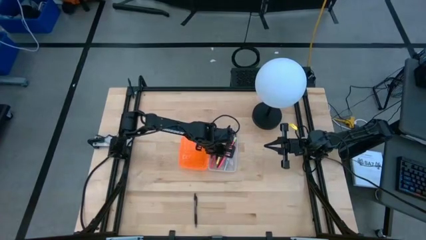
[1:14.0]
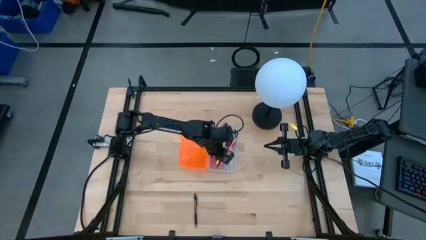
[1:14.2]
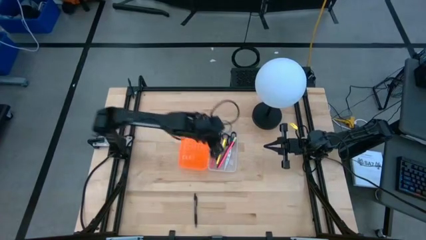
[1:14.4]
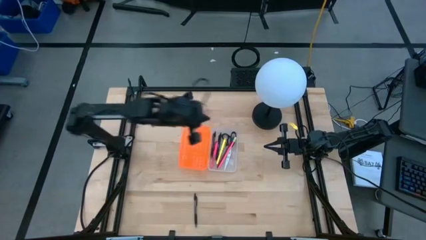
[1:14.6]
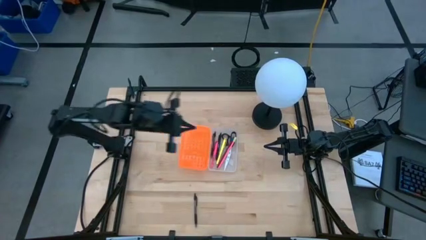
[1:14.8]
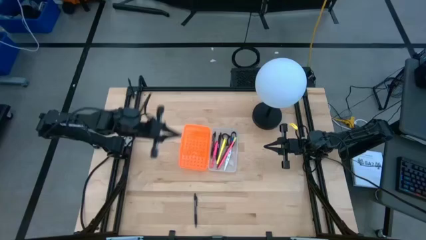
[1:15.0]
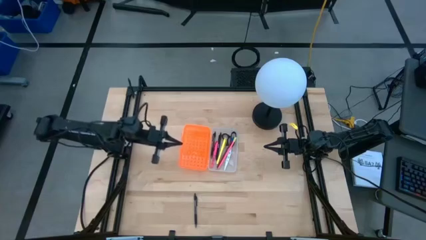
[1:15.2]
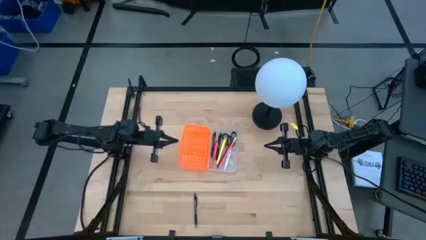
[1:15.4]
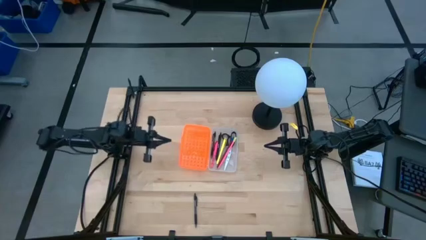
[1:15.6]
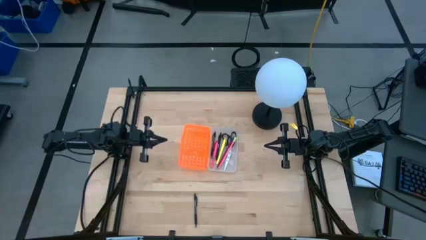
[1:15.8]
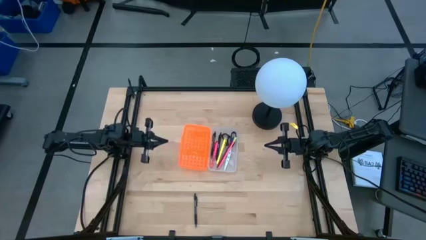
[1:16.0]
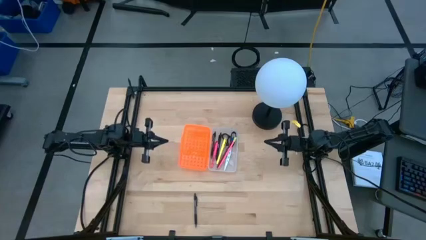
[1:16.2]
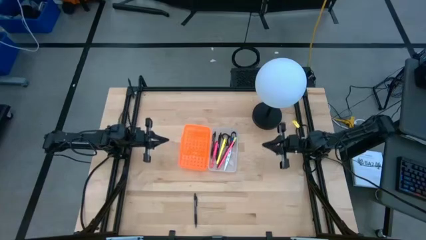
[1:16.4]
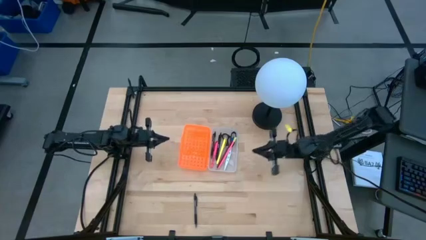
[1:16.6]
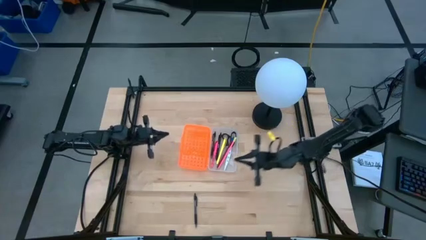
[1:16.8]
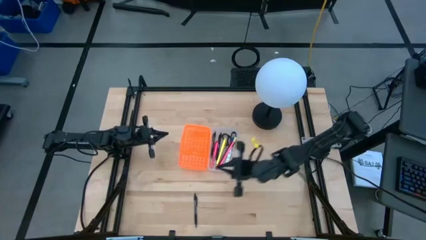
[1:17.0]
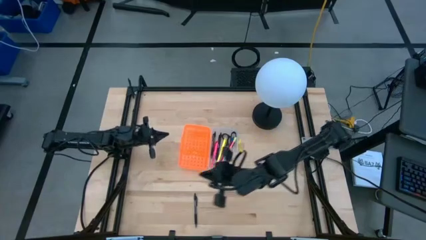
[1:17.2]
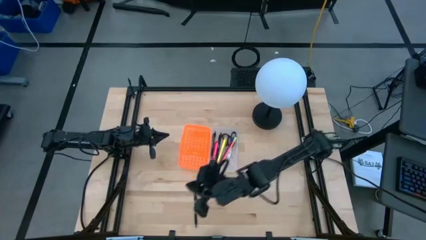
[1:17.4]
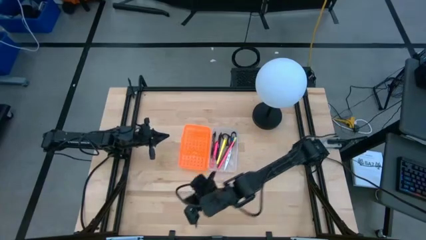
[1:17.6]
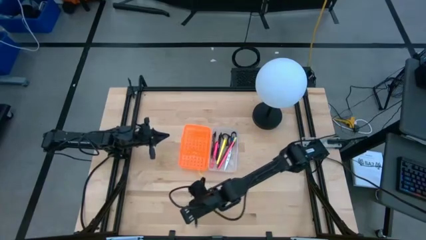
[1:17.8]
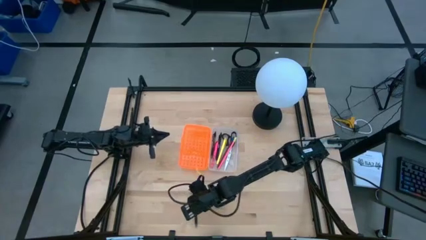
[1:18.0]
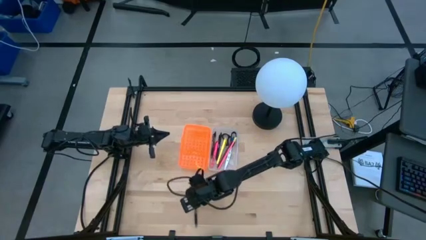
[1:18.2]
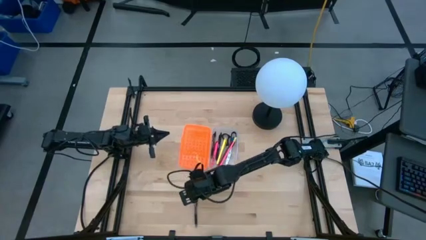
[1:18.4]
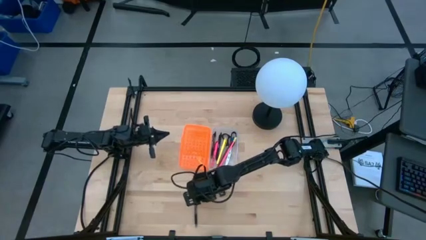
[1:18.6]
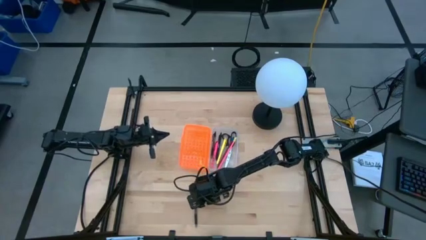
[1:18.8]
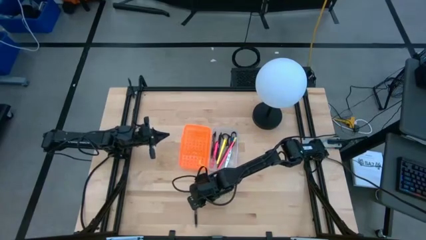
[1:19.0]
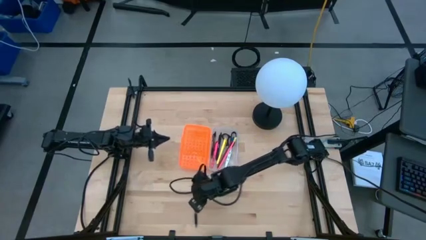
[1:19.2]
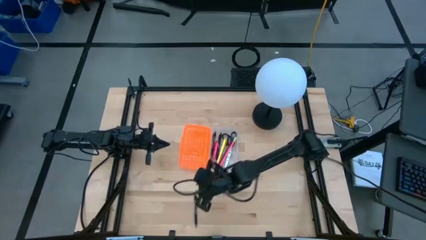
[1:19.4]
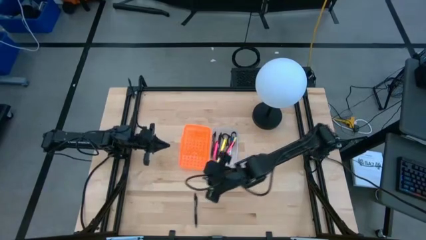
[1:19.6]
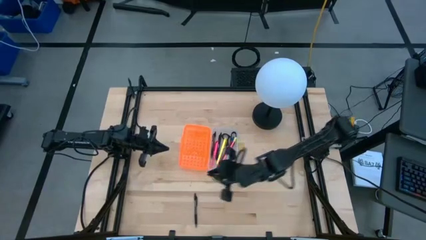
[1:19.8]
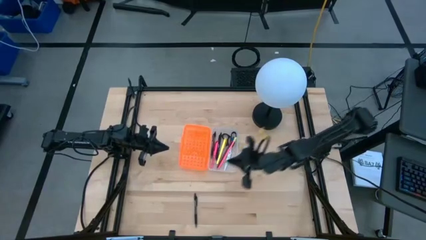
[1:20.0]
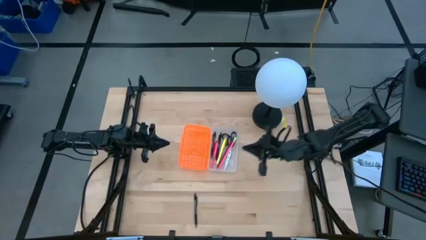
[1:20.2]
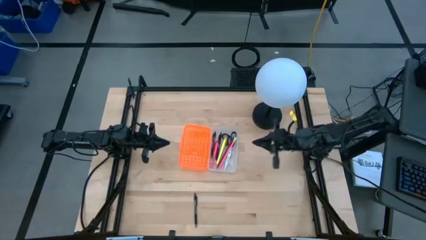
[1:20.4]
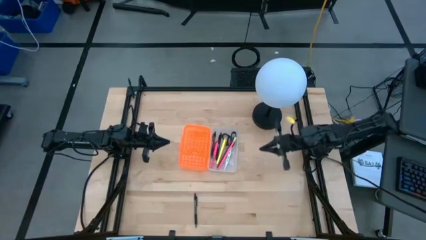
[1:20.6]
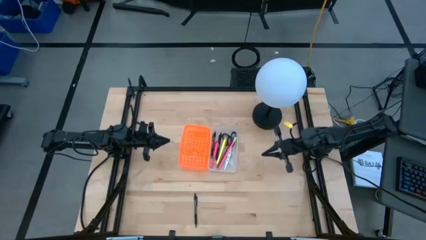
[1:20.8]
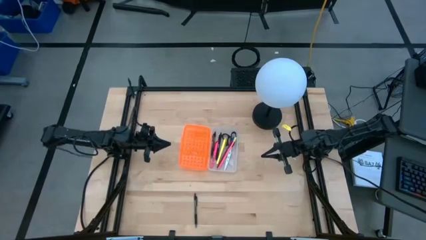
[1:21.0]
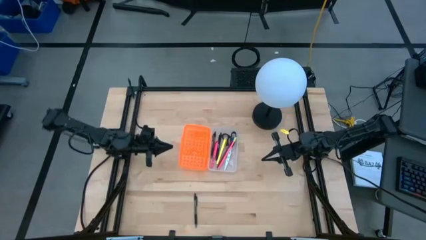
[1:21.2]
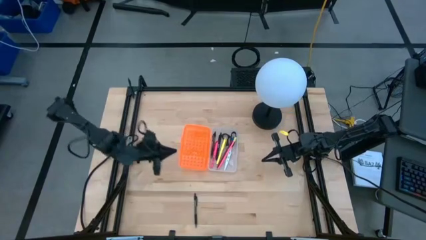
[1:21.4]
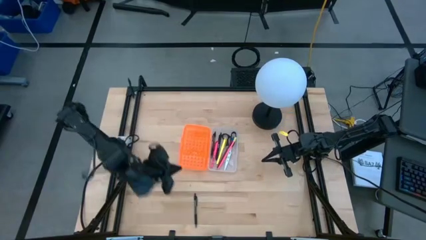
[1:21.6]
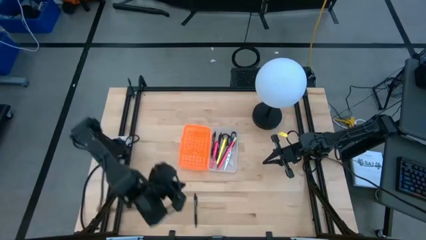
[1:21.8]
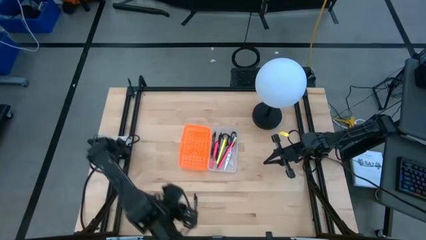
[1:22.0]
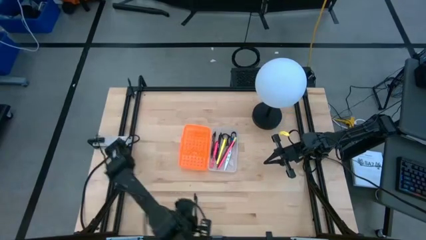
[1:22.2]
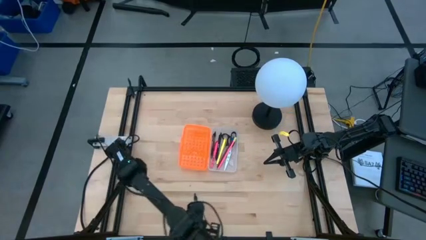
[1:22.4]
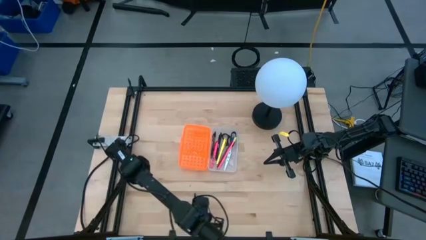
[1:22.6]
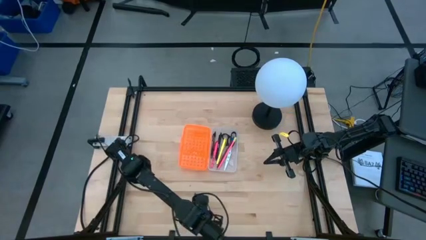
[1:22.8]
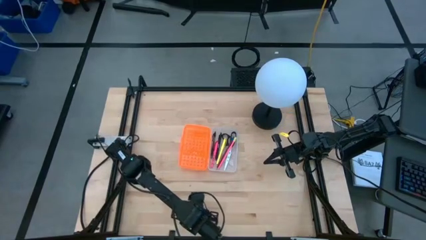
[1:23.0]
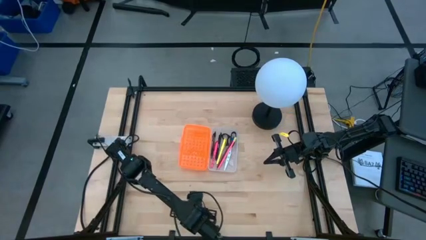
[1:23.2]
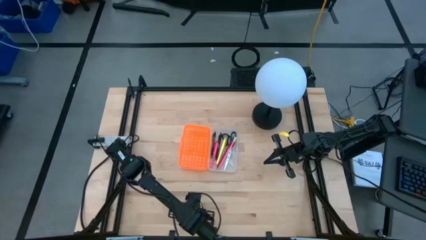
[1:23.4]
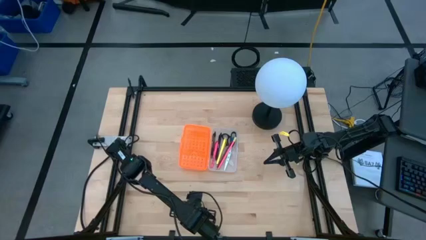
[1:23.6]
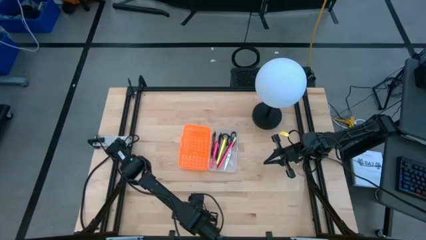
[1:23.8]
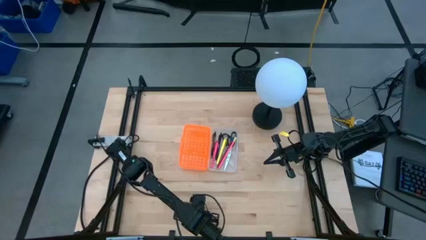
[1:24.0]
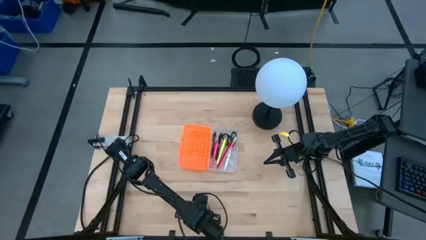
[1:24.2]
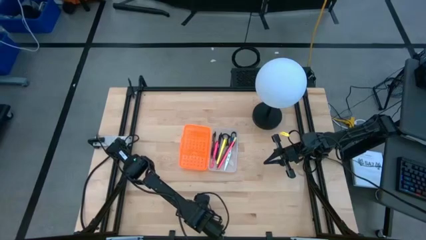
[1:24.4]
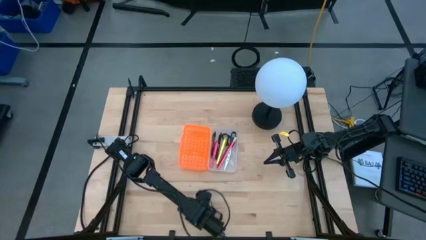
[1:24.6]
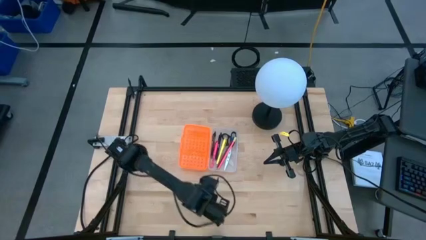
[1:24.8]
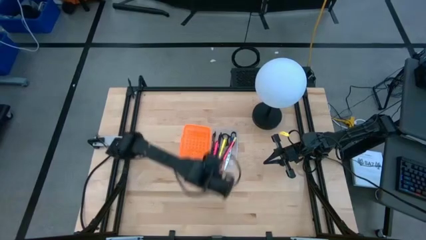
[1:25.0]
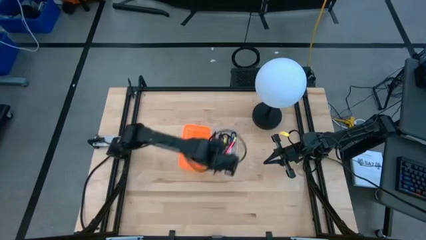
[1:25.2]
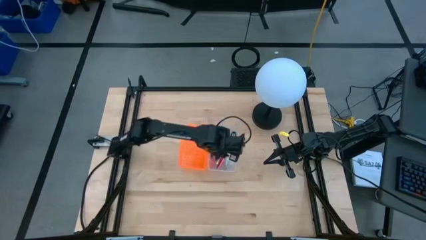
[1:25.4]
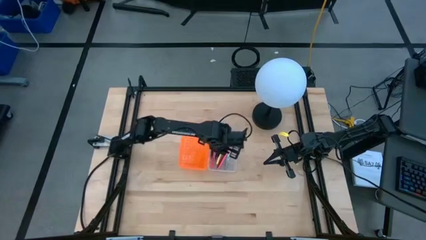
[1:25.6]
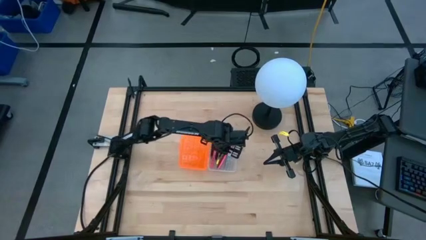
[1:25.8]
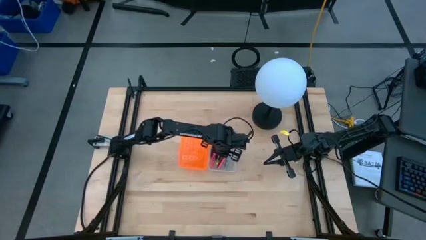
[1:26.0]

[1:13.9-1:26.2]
Task: Pick & place school supplies into a supply box
Put the black pen into the orange box

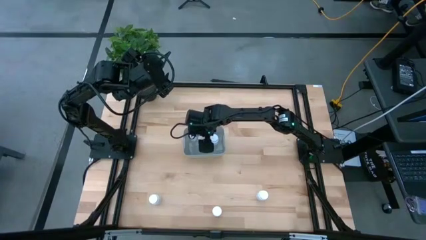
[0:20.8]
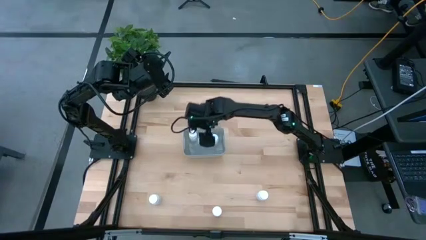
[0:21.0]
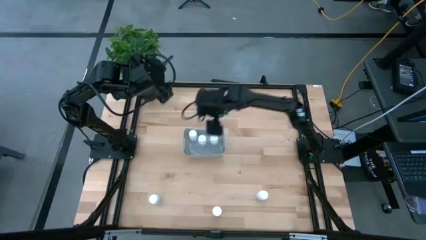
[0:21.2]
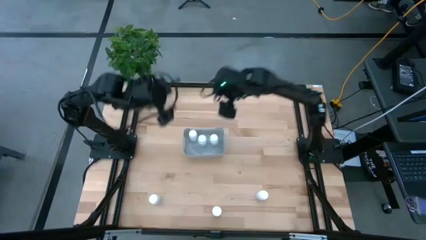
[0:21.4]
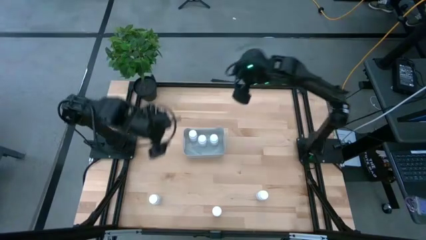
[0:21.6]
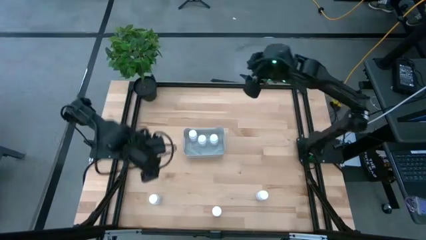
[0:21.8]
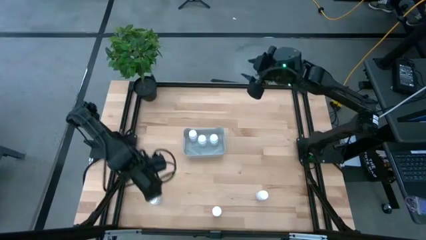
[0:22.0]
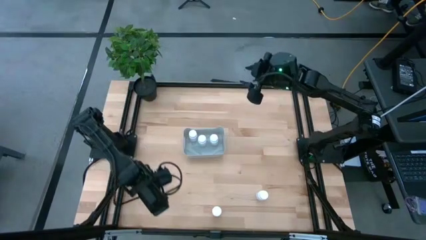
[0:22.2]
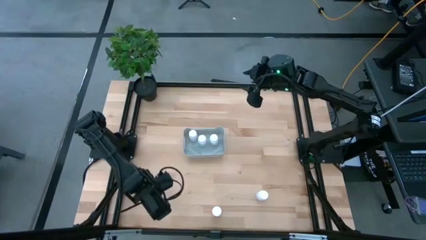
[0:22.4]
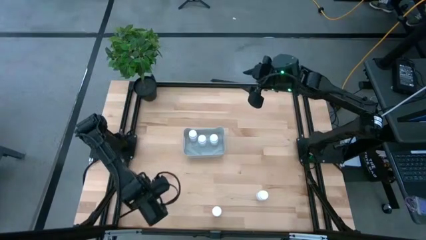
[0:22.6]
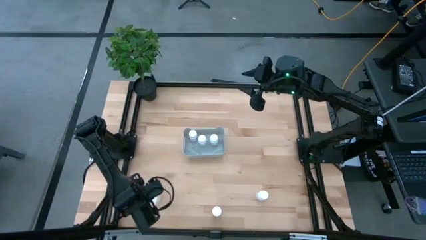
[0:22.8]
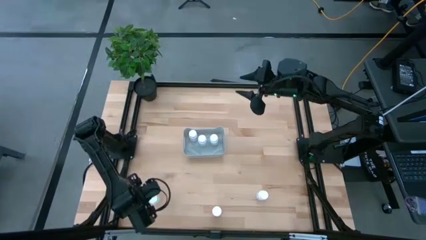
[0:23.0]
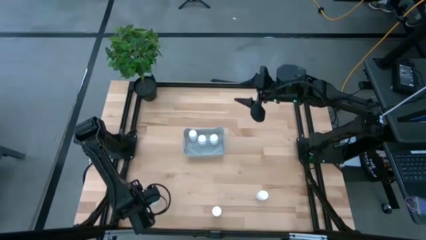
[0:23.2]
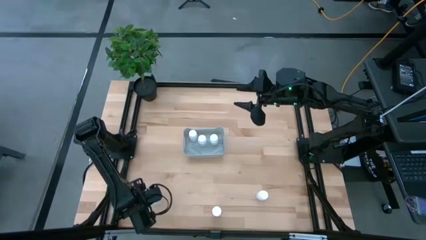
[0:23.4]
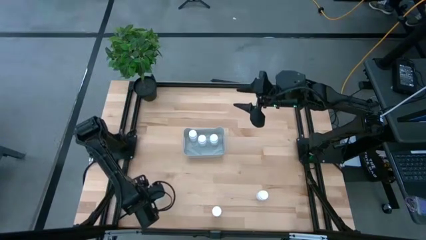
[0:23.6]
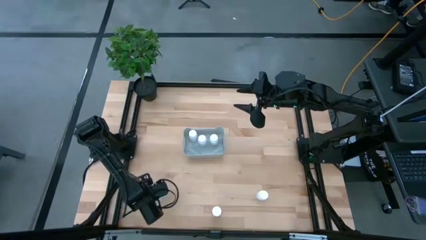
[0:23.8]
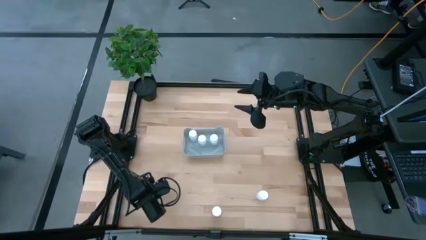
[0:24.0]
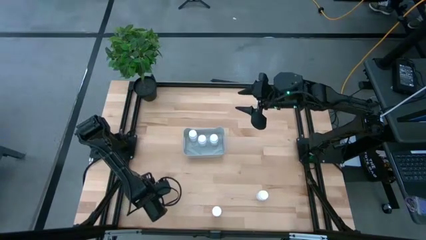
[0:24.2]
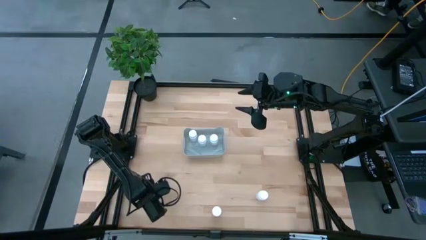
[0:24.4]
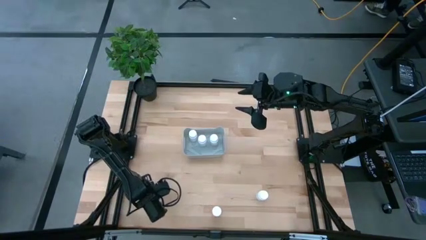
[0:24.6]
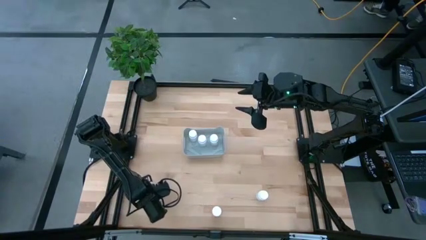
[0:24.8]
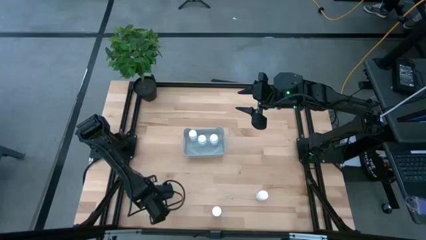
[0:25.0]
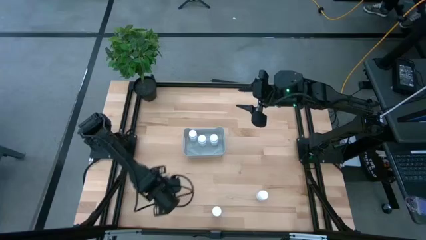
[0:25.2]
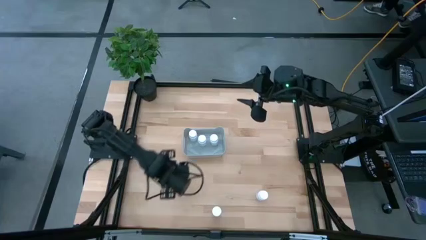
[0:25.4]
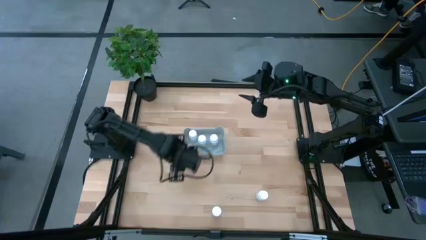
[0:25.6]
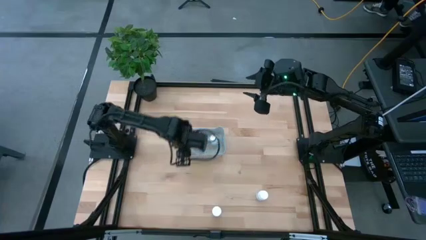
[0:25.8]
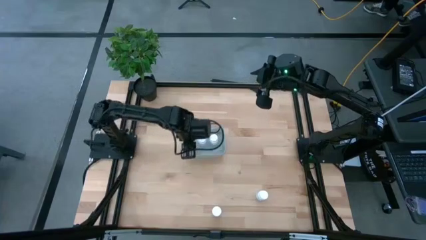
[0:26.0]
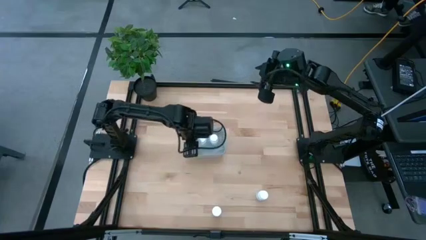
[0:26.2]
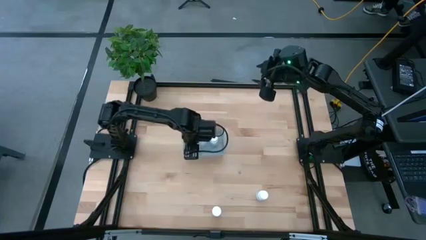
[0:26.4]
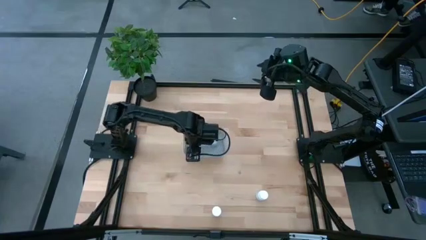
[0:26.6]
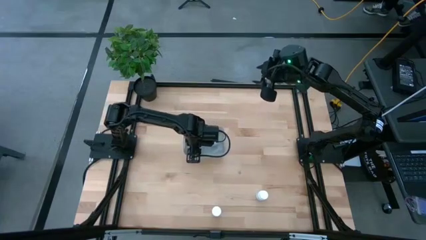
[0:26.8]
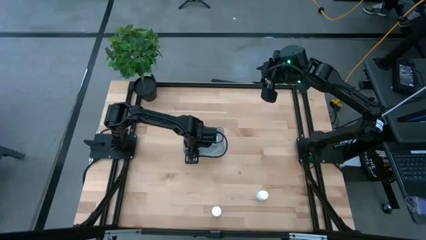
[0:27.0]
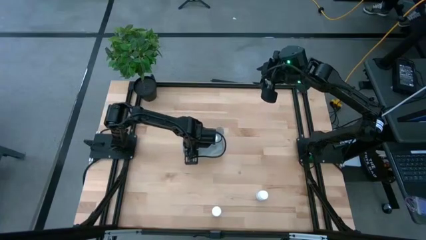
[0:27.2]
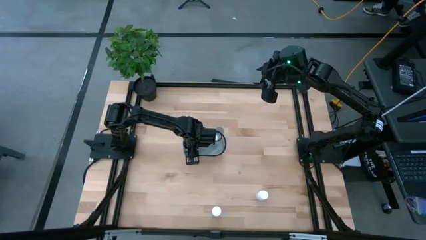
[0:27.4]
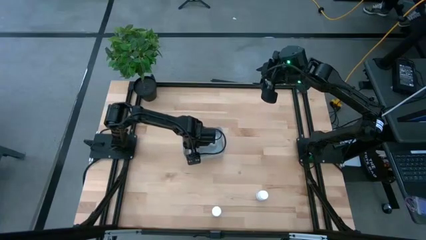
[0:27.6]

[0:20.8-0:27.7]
Task: Pick and place pill bottles into a basket
Put the white pill bottle into the gray basket
